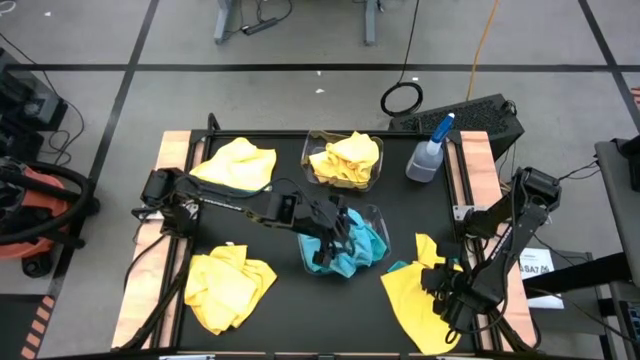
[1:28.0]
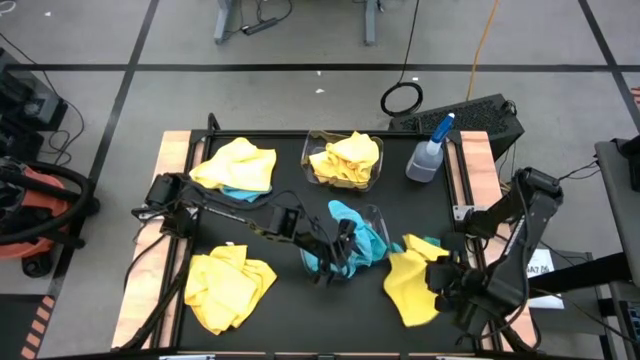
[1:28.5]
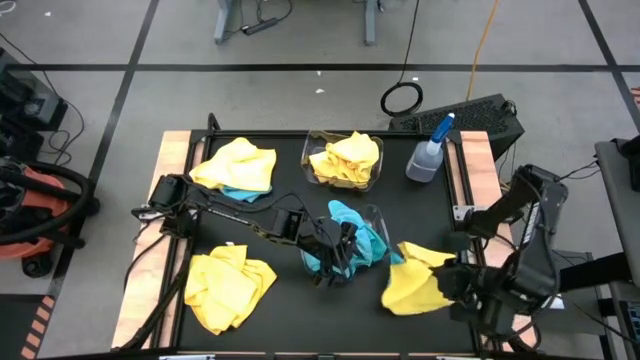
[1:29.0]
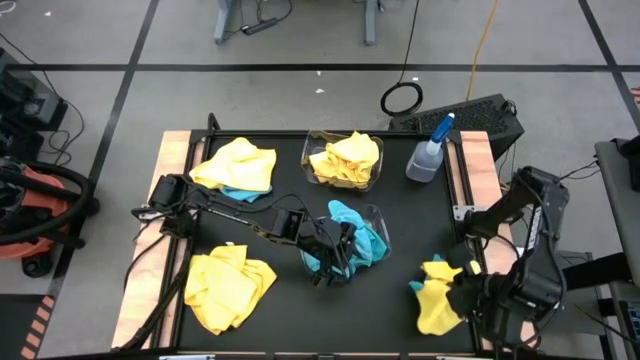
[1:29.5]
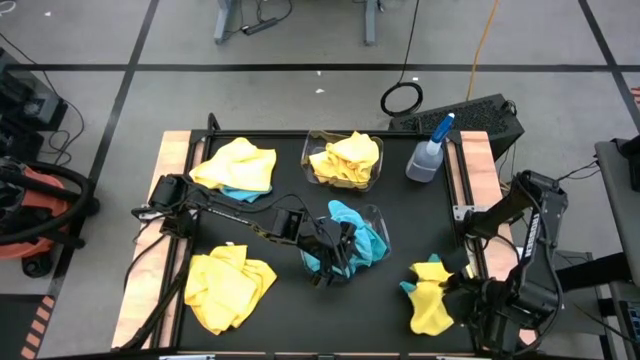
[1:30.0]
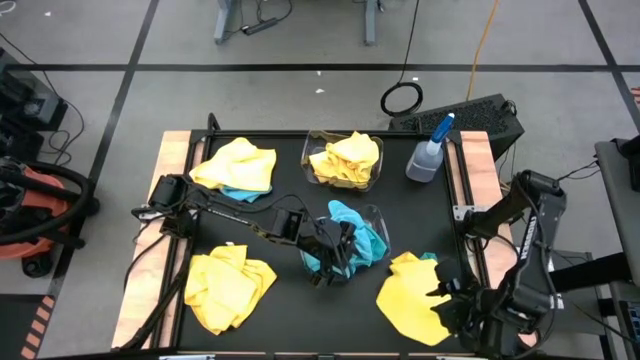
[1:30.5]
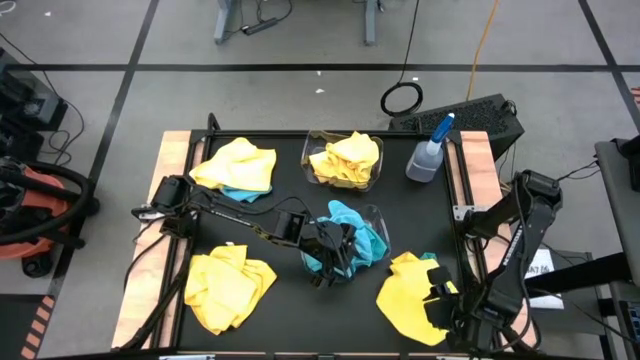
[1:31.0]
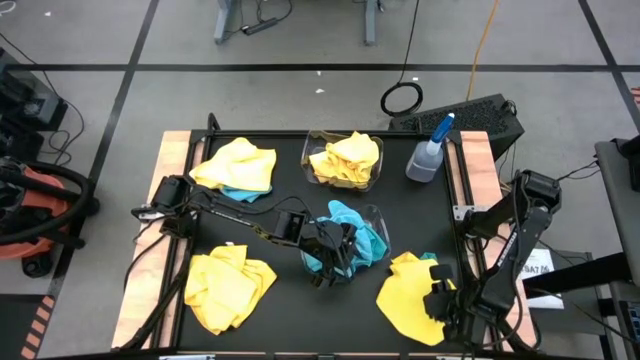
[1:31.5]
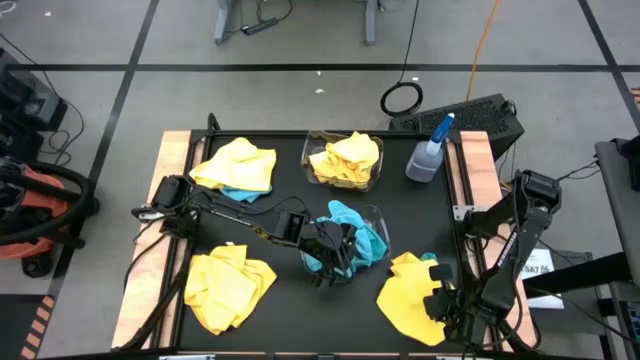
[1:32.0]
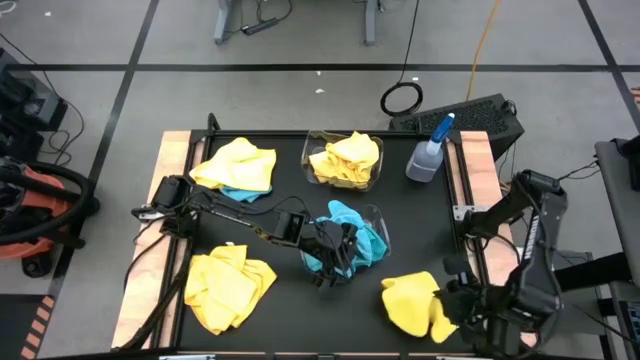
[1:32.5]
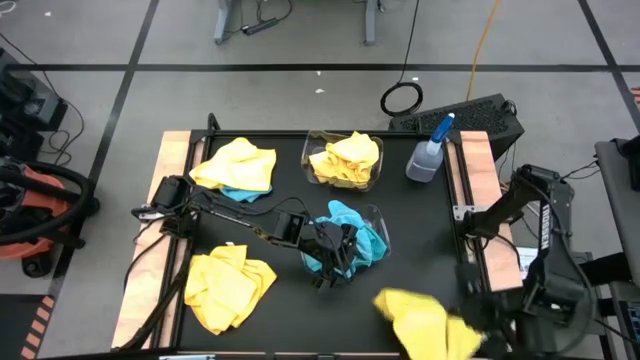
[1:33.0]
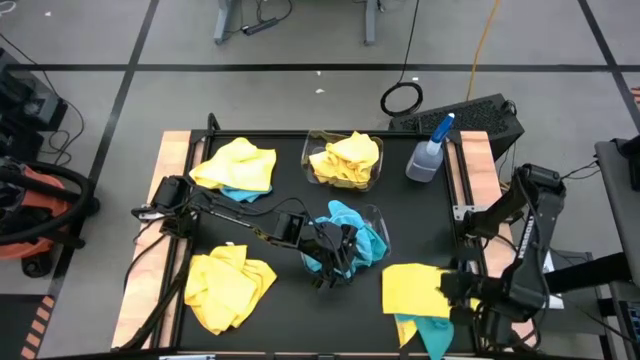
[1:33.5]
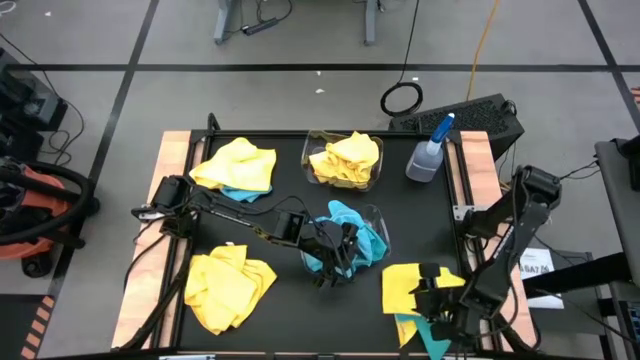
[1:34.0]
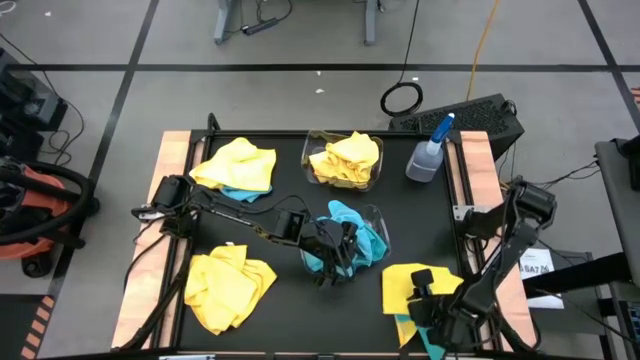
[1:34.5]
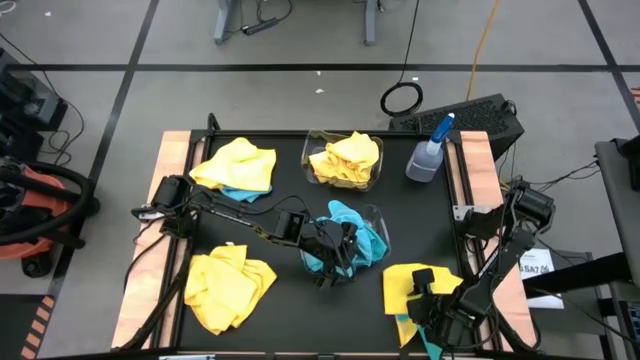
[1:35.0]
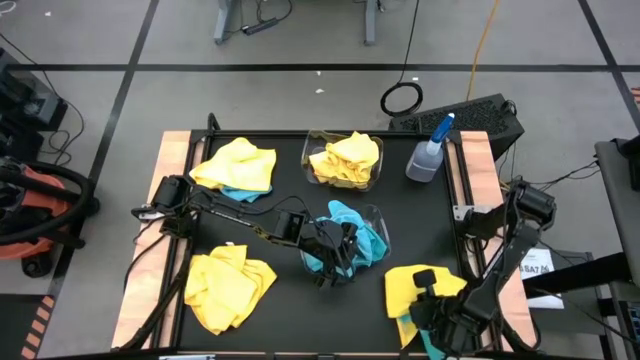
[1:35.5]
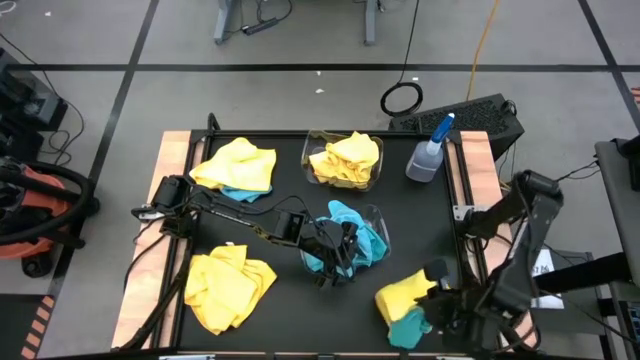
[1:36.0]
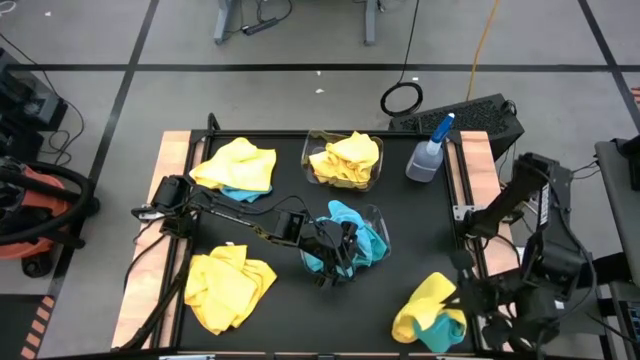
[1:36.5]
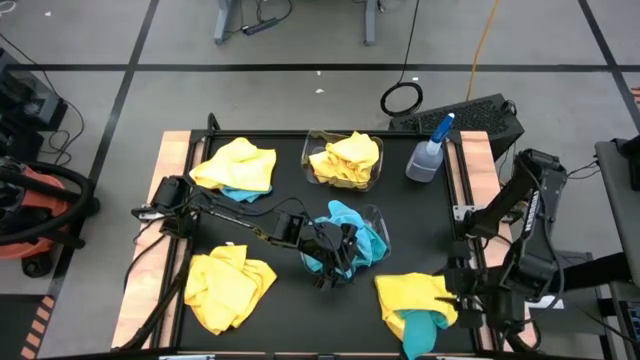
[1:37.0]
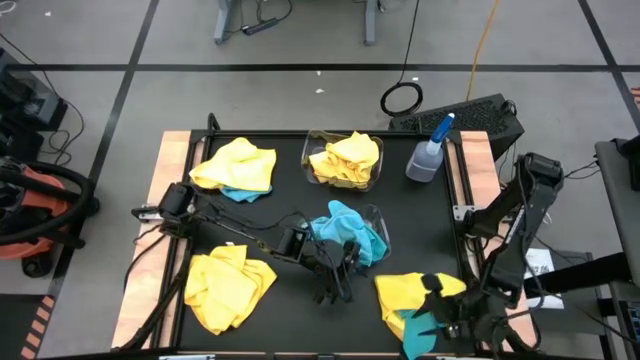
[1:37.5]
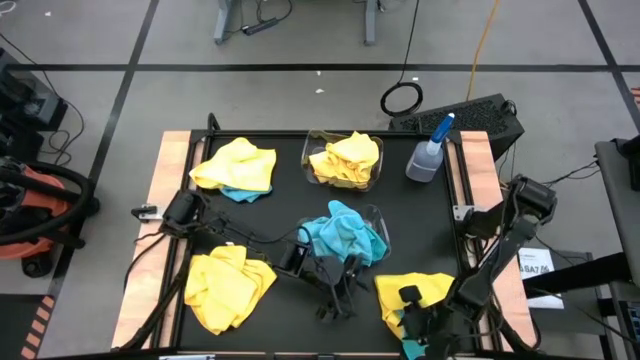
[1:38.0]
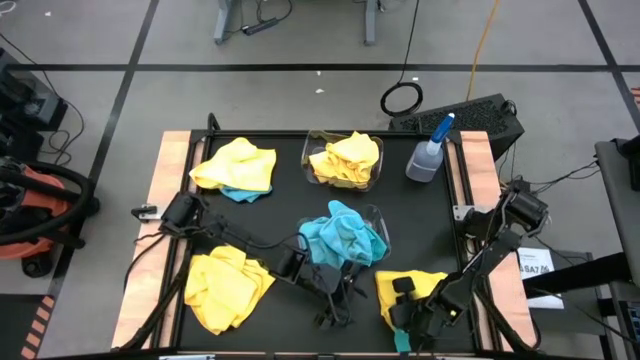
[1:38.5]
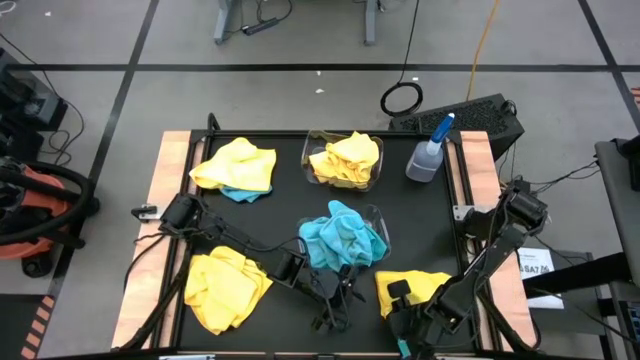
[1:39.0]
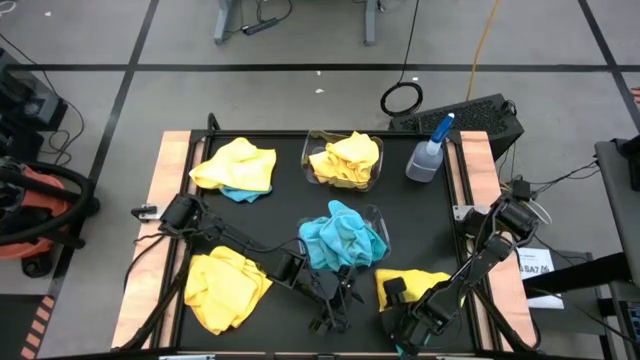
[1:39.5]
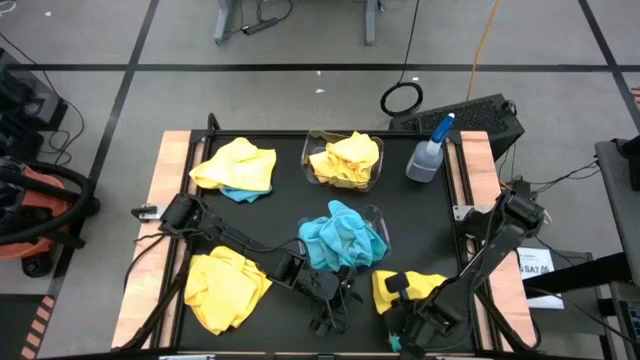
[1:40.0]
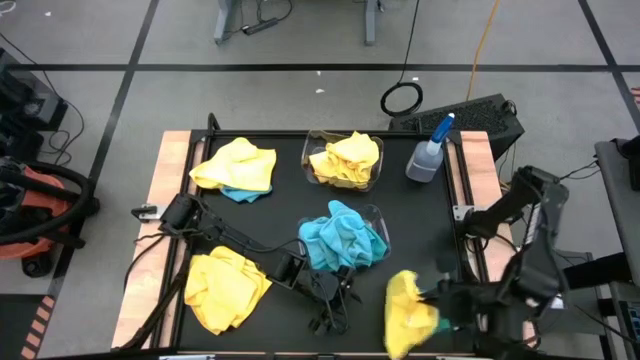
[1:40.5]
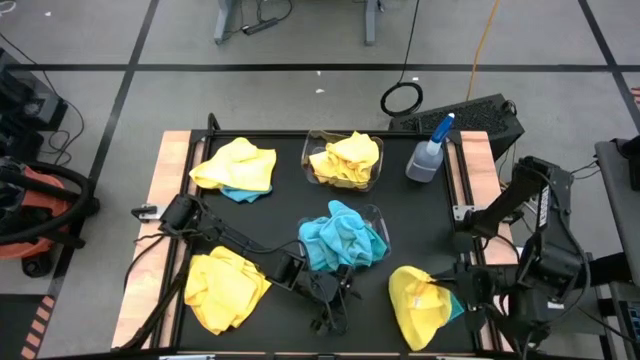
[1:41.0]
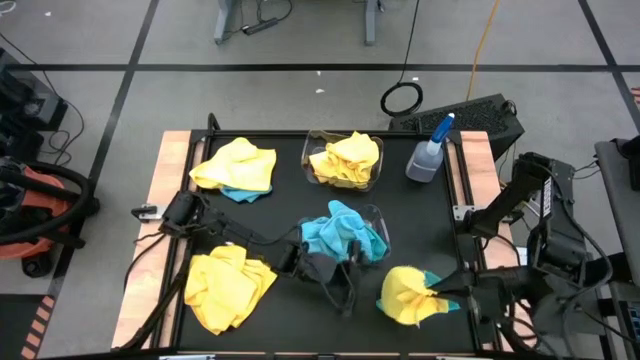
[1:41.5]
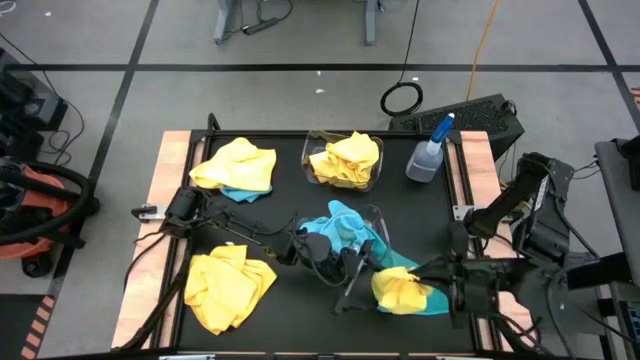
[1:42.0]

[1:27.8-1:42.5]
Task: Sort microfiber towel by color & place in baskets
Put the yellow microfiber cloth into the top transparent bin

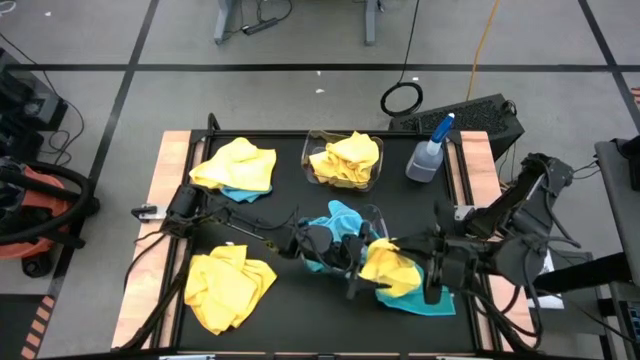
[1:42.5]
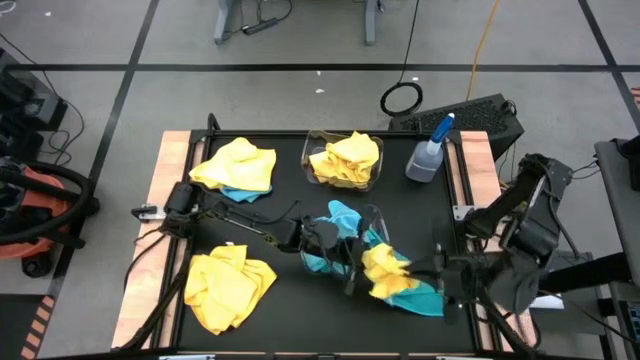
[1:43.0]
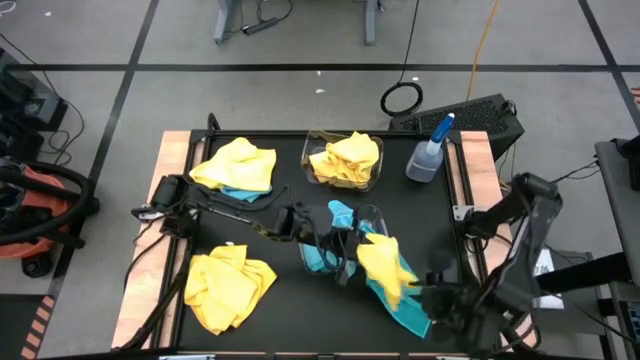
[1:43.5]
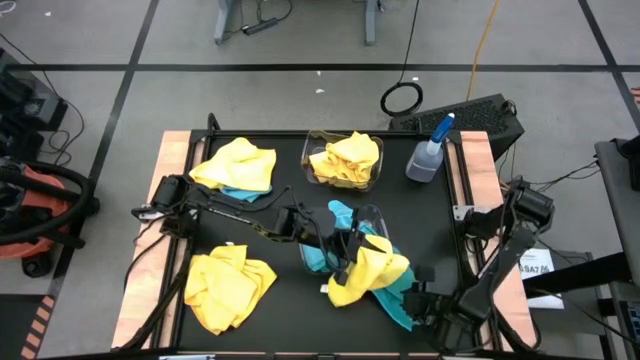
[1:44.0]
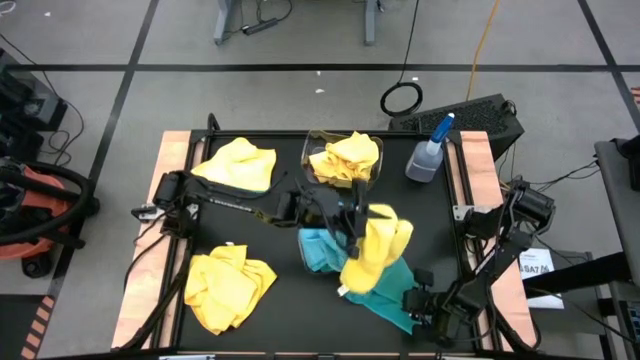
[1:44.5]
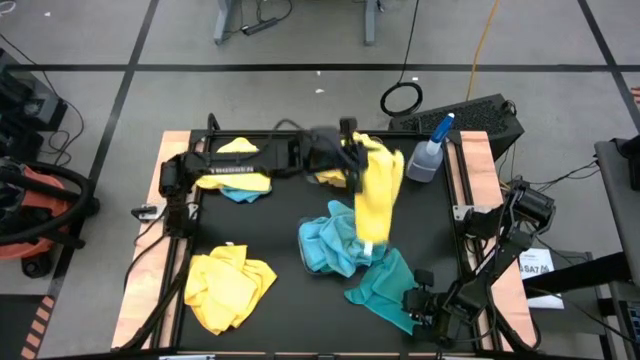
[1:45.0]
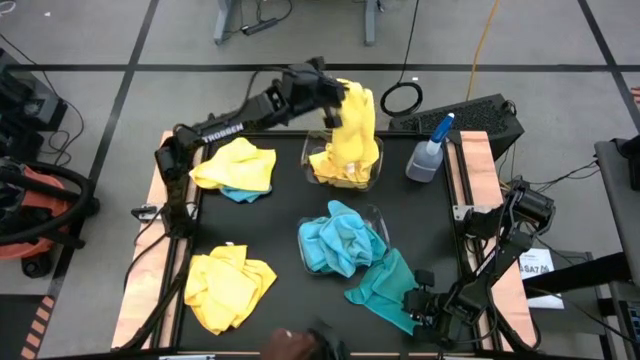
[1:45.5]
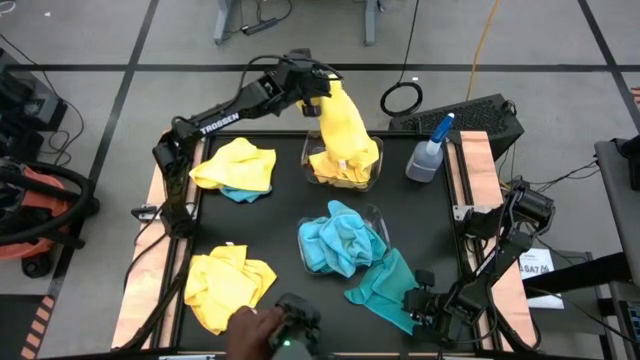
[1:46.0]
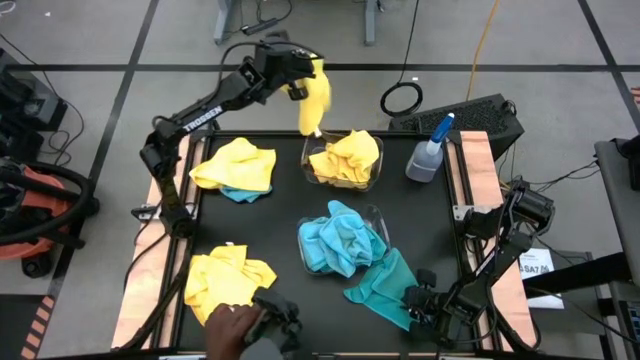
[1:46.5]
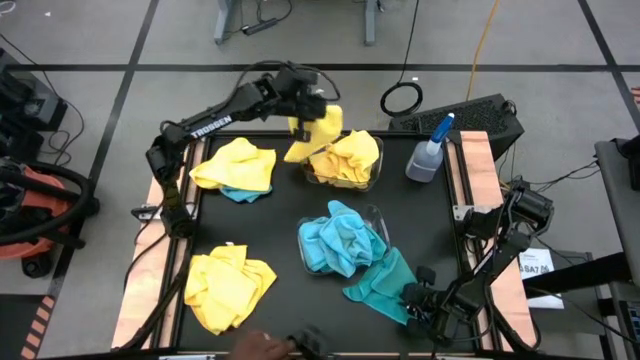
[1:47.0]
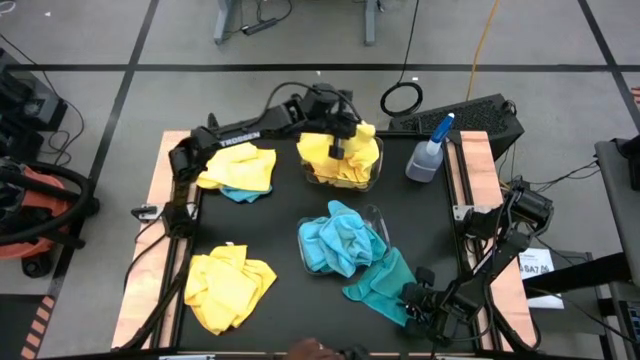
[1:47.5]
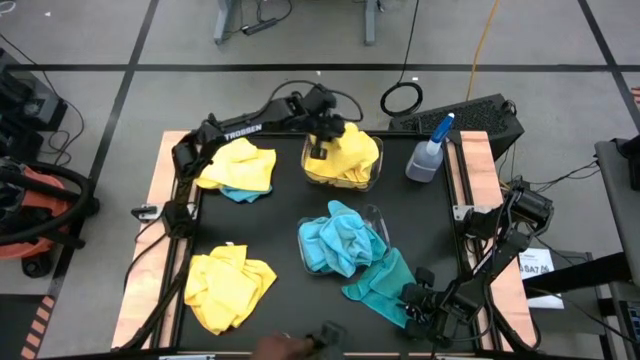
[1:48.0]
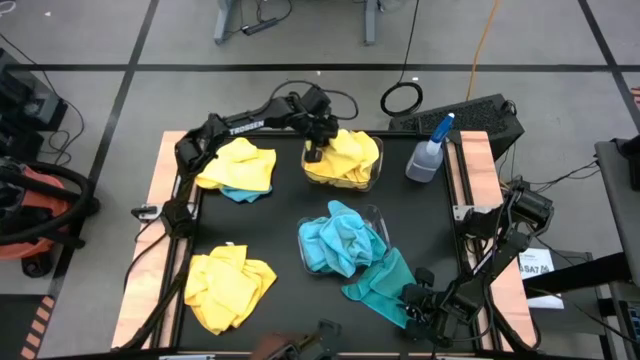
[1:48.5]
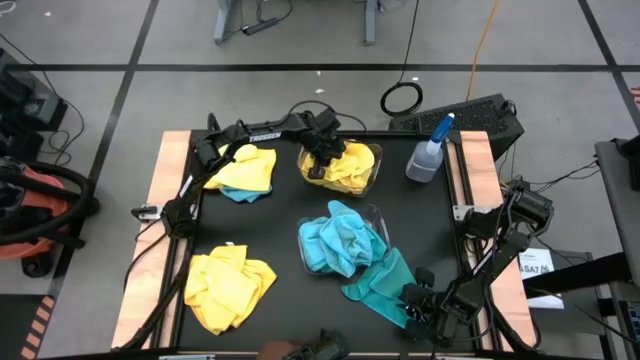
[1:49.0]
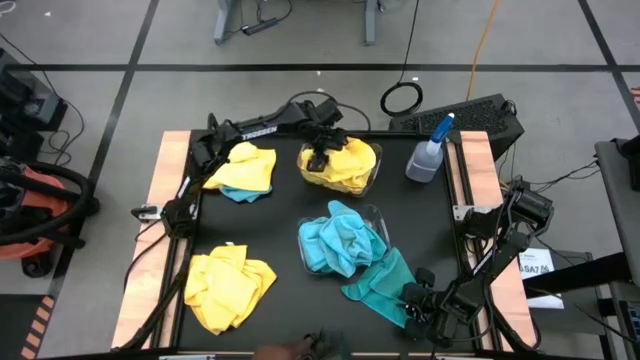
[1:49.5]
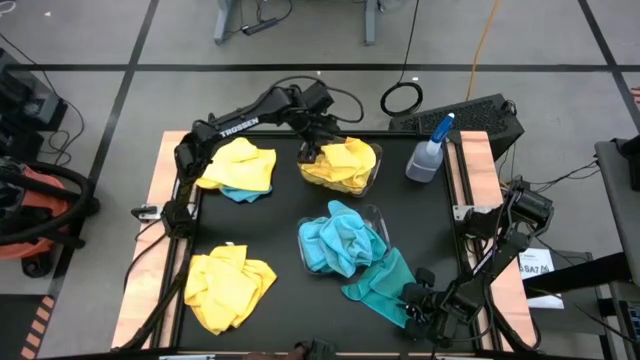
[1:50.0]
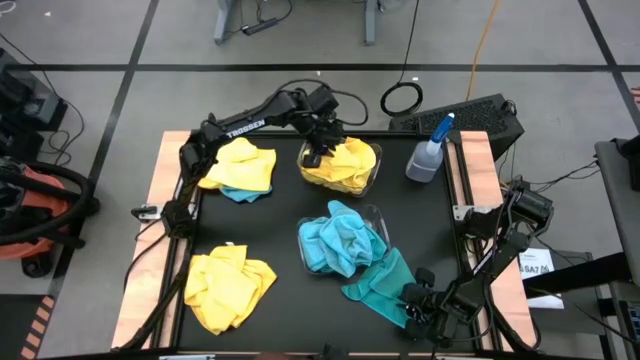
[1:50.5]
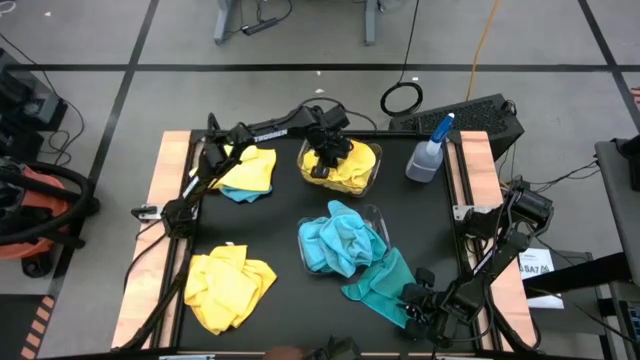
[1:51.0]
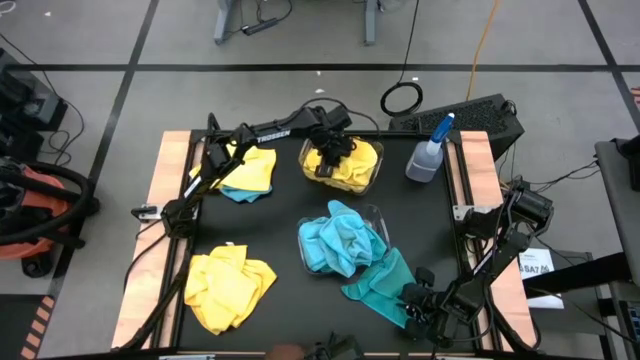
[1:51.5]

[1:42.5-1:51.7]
Put the yellow microfiber cloth into the top transparent bin
